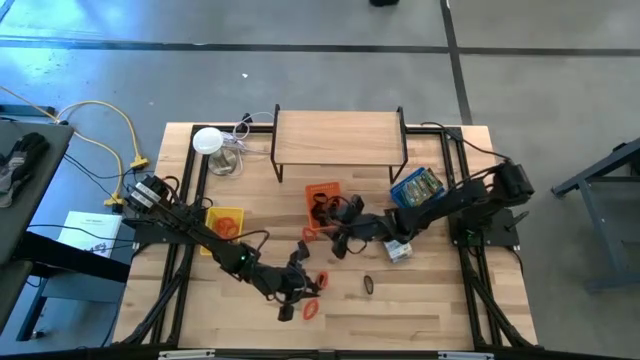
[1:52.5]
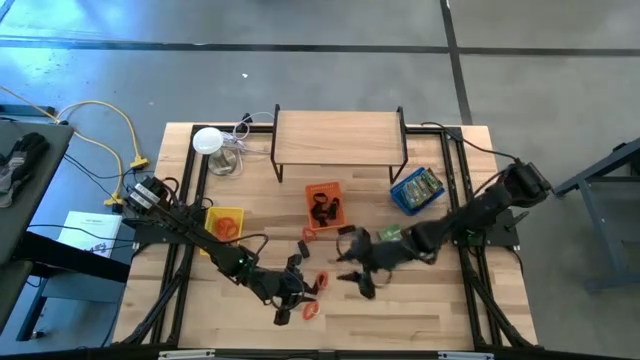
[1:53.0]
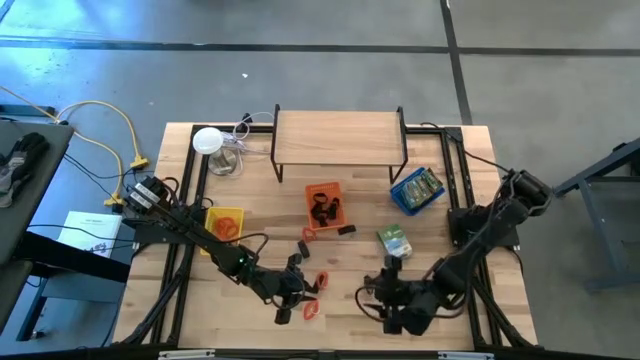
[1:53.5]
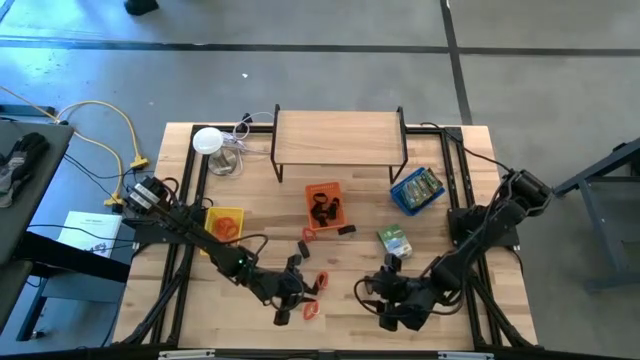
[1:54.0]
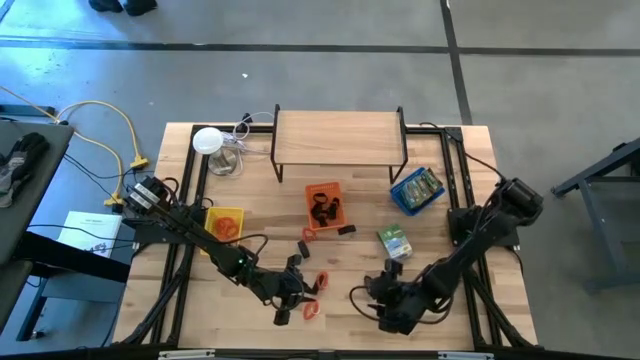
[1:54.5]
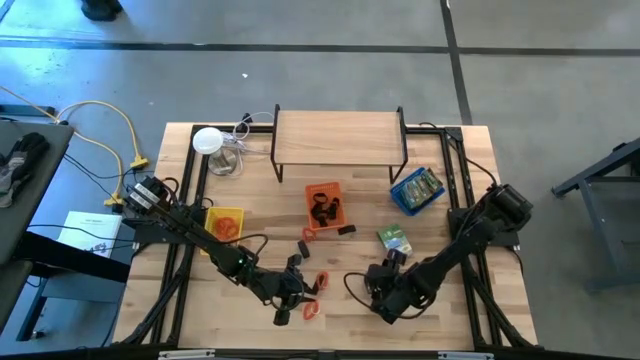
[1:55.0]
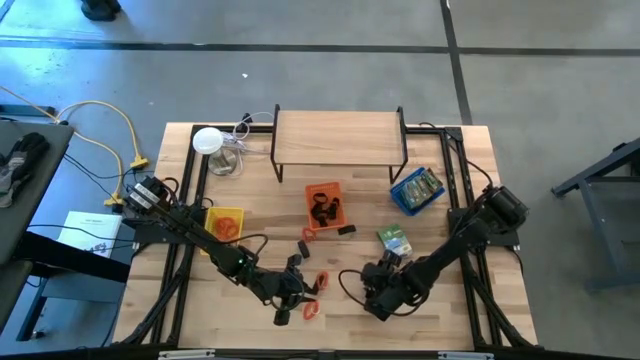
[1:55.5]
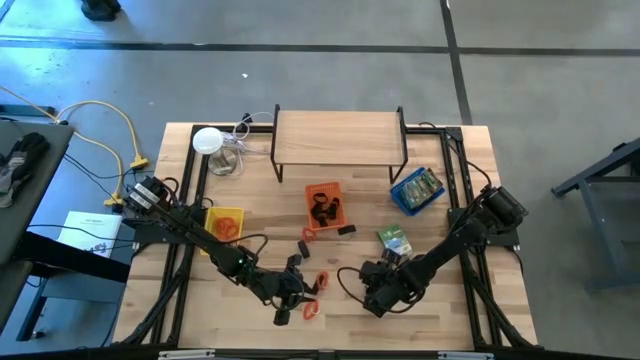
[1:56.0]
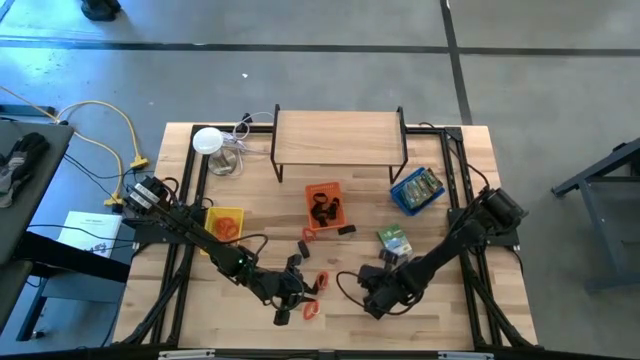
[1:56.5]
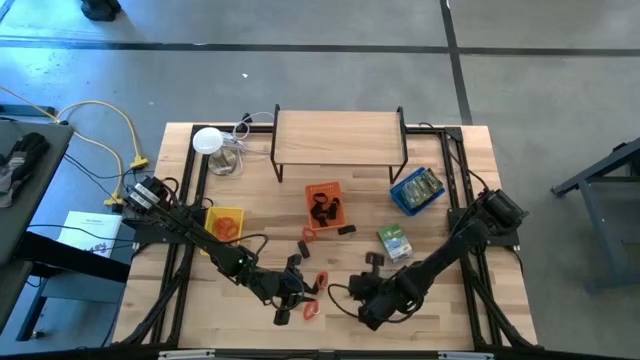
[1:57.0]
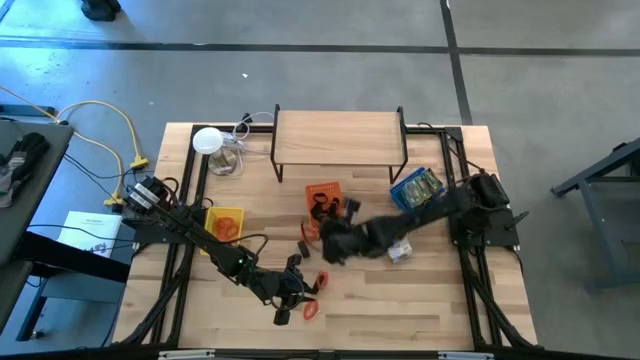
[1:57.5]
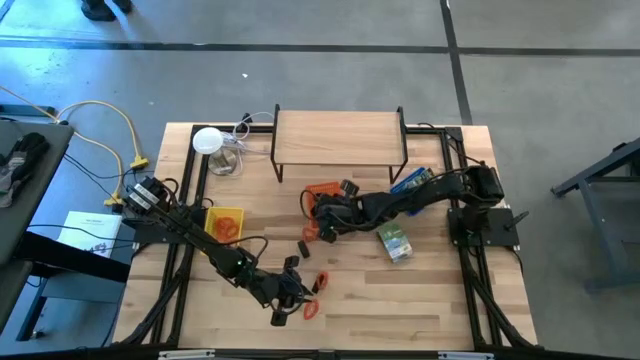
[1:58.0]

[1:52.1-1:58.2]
Task: Pick & Place Office Desk Supplies
Put the black rubber band into the orange bin

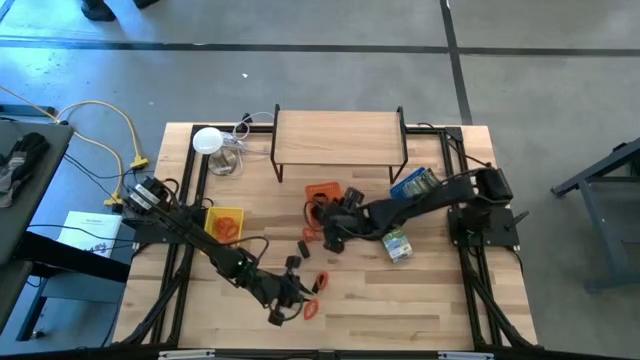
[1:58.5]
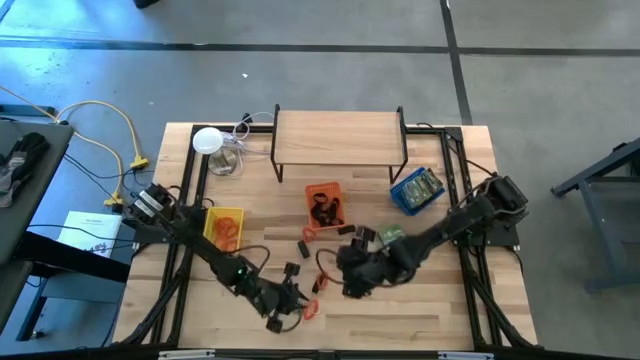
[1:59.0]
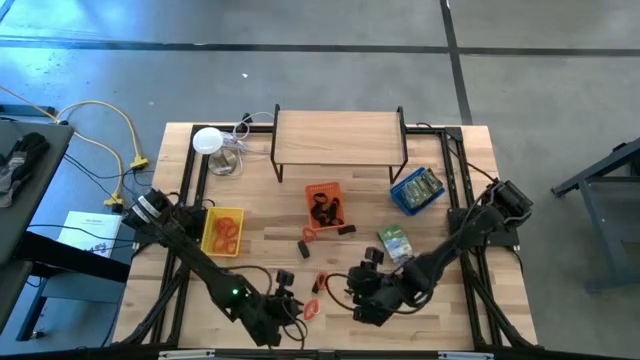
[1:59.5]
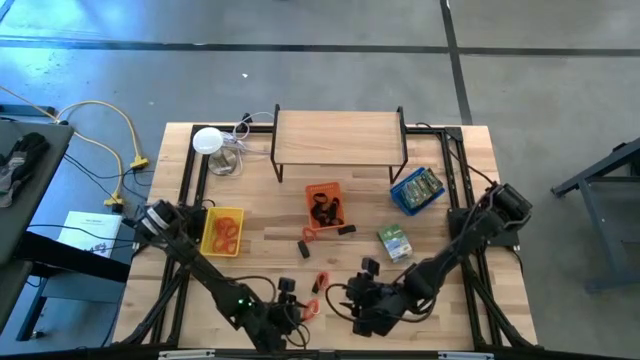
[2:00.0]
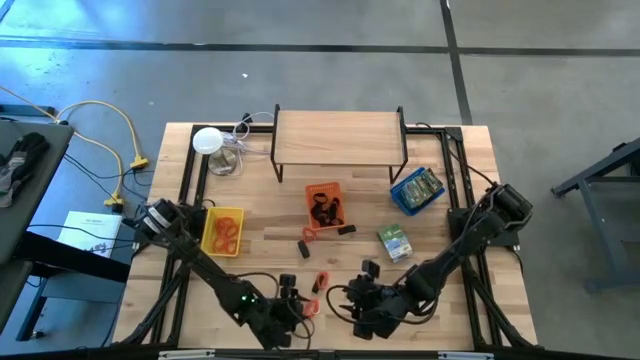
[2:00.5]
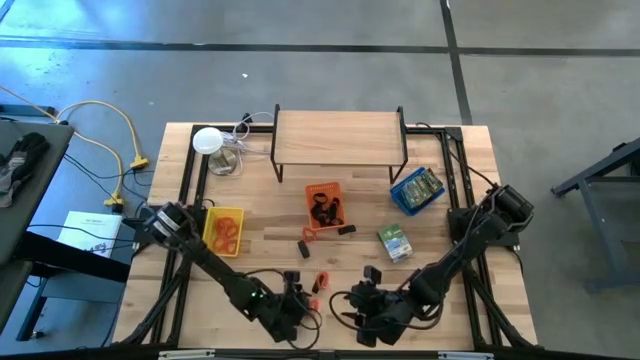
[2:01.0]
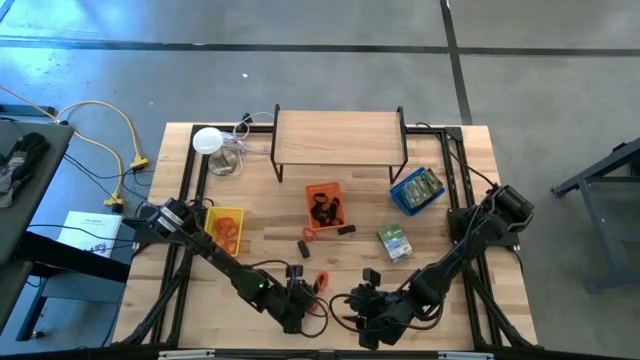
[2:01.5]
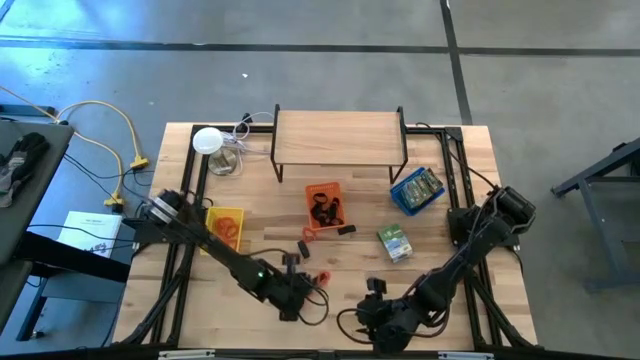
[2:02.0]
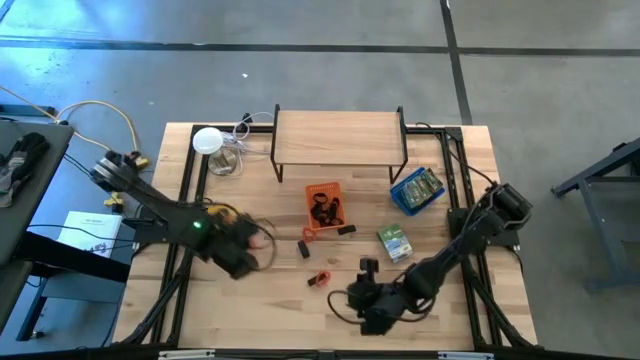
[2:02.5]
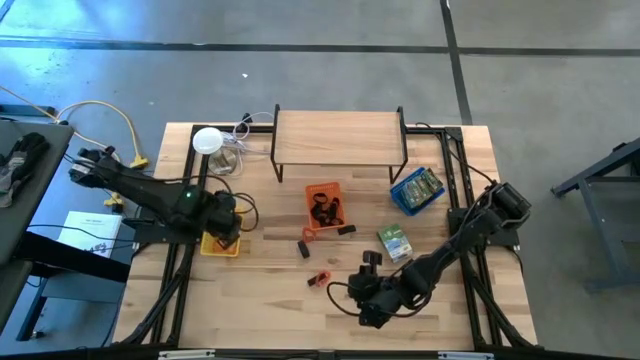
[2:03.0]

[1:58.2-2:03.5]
Put the orange spring key chain into the yellow bin

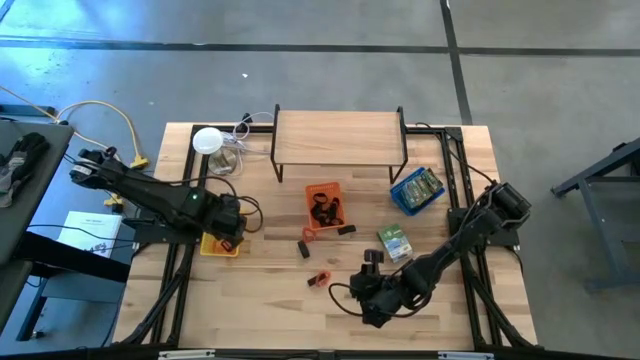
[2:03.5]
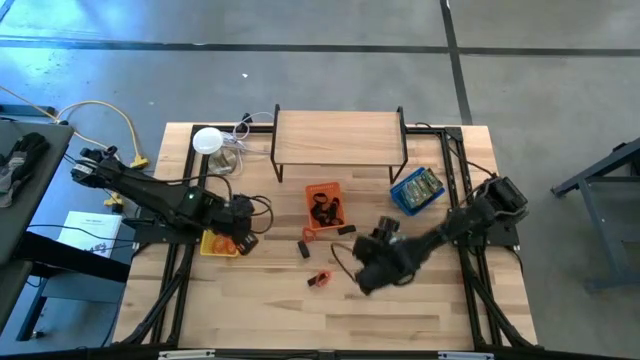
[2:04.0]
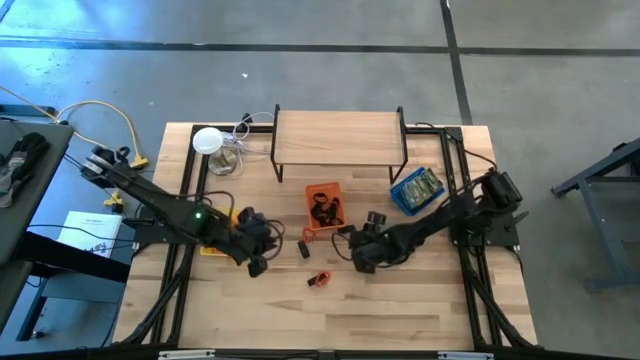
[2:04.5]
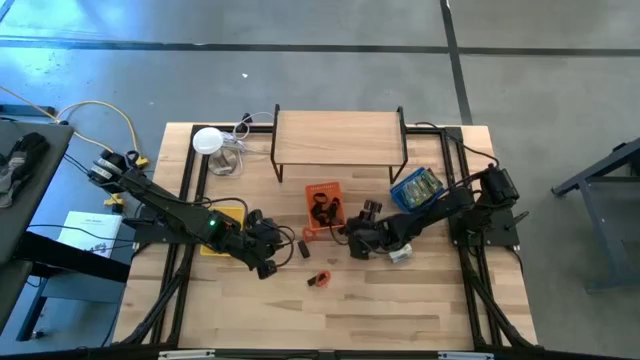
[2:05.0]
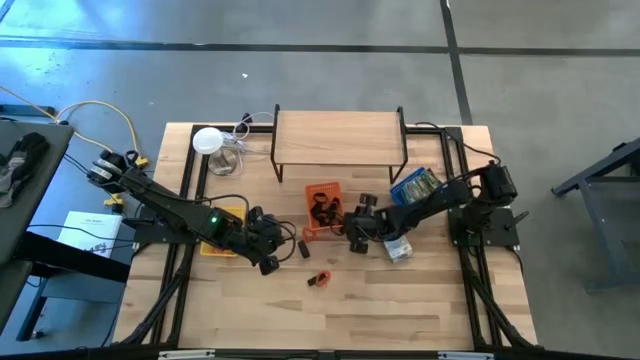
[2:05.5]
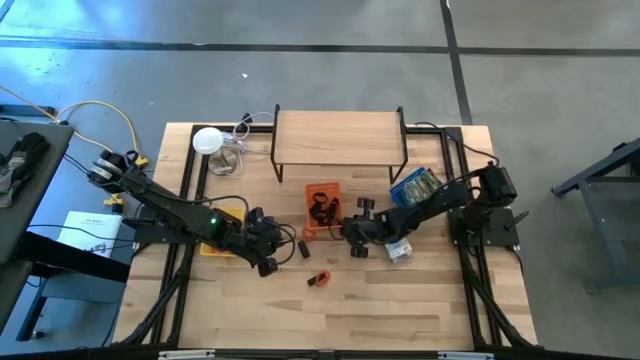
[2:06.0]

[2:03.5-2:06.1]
Put the black rubber band into the orange bin

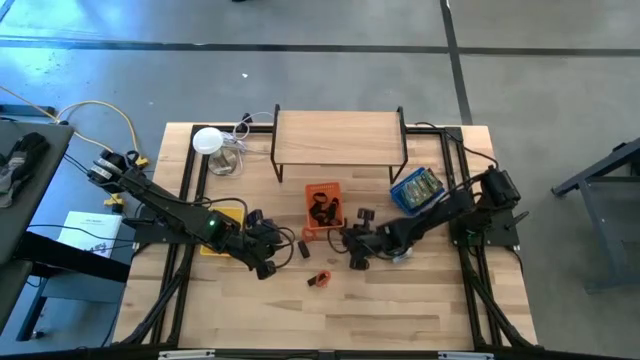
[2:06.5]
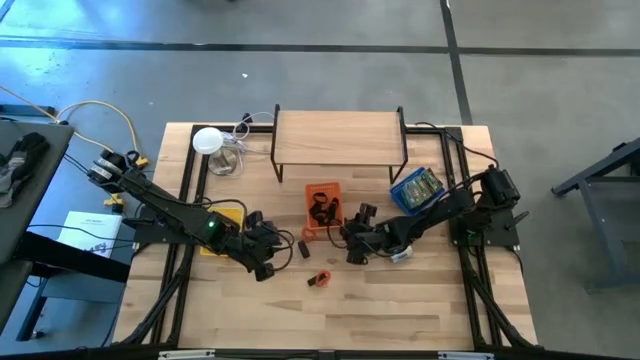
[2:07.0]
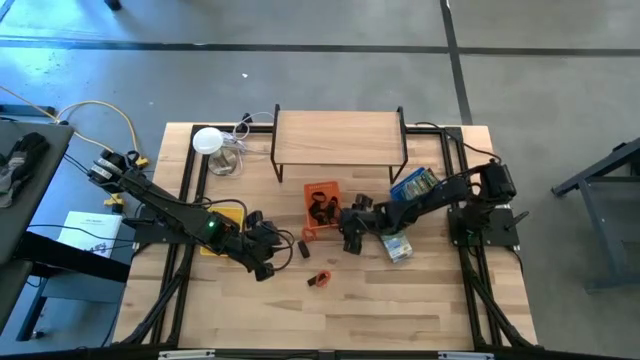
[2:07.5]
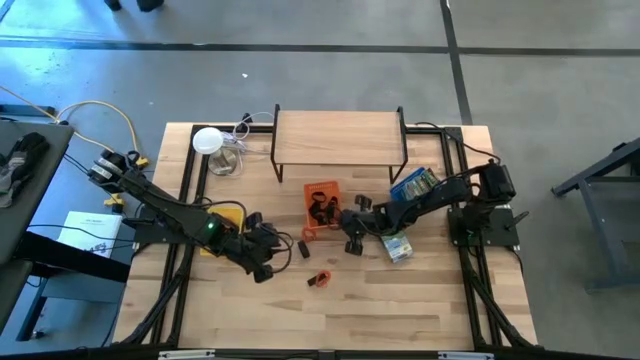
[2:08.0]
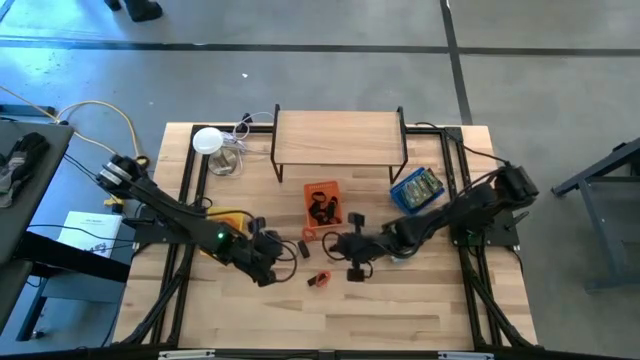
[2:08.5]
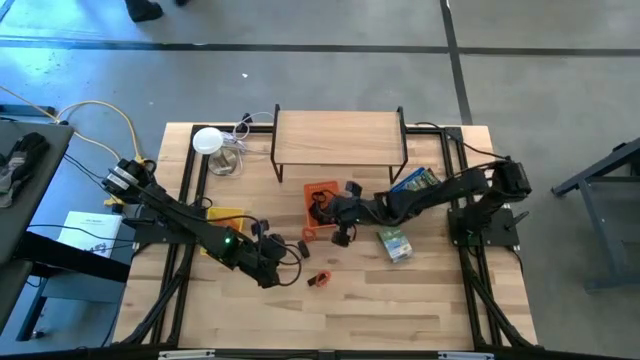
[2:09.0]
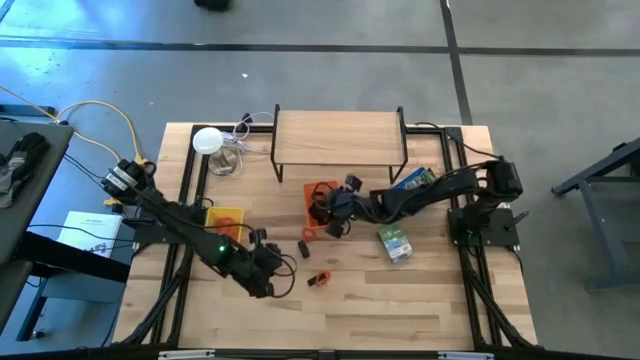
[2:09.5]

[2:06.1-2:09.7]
Put the black rubber band into the orange bin

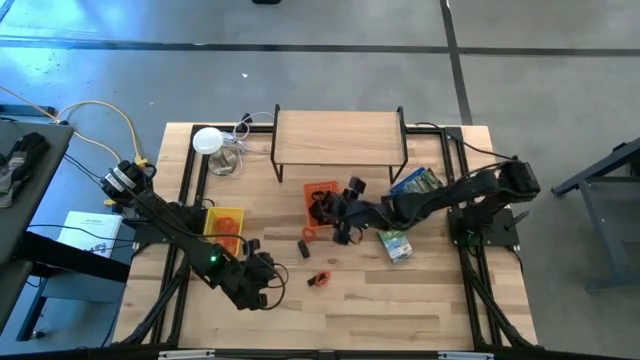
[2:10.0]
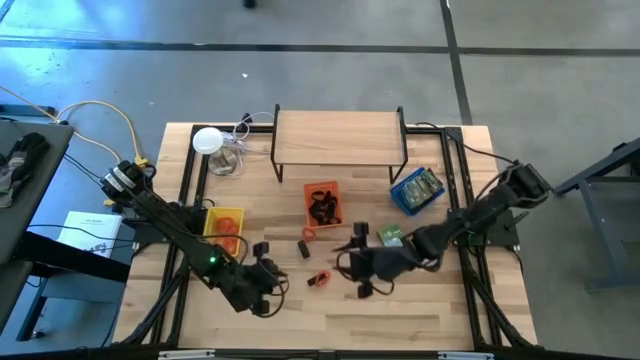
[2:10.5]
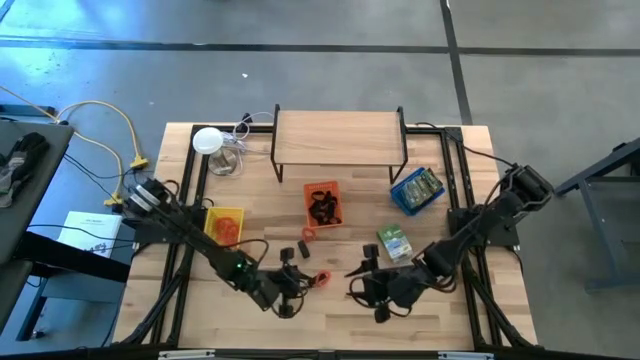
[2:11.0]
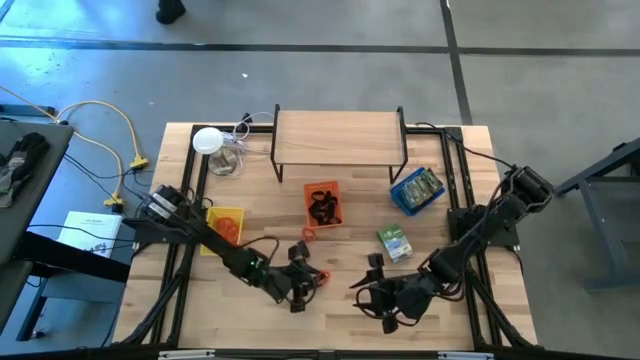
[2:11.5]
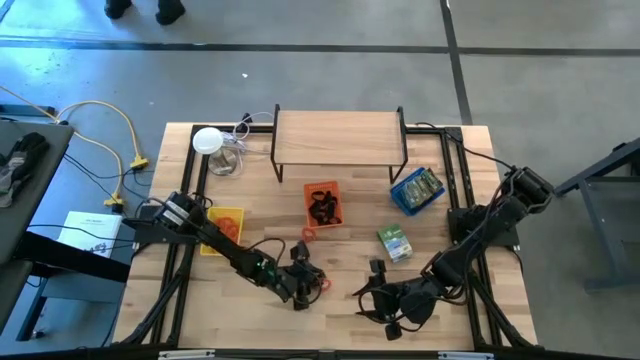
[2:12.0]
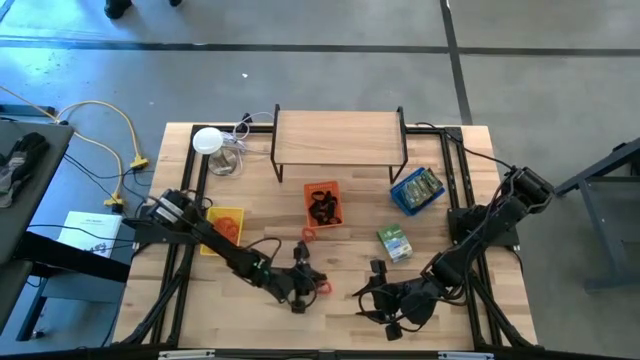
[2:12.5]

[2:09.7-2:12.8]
Put the orange spring key chain into the yellow bin

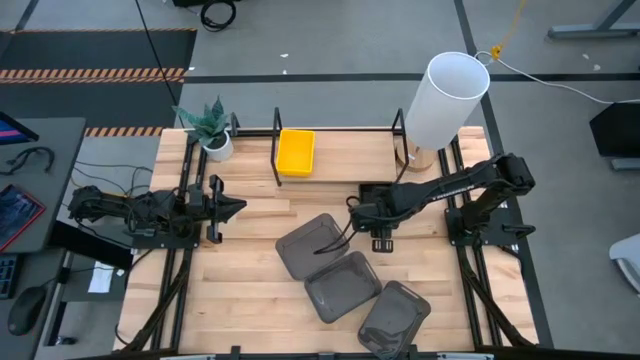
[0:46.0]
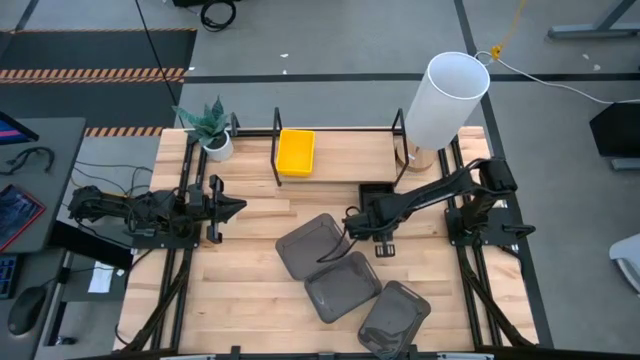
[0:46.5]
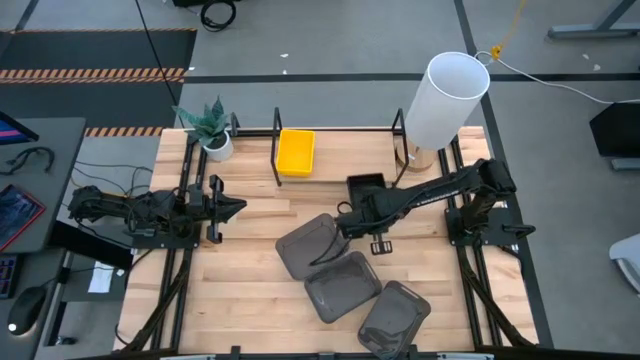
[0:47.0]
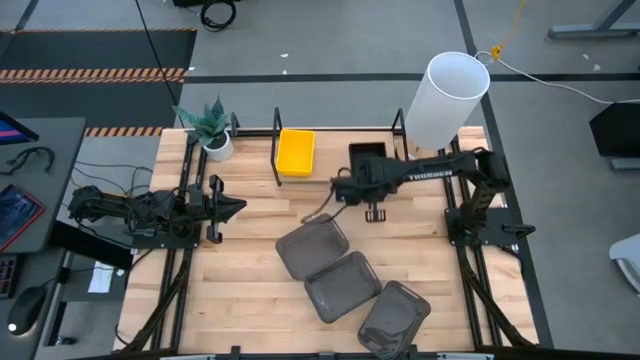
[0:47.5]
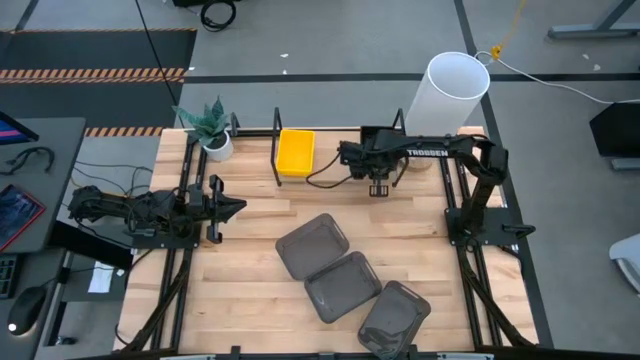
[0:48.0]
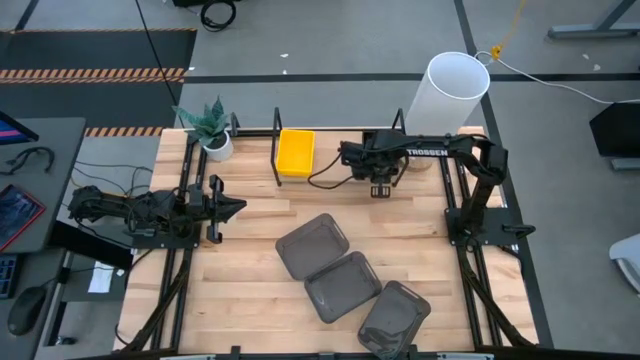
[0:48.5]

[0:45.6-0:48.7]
Task: Stack baskets on shelf by color
Put the stacked black bins on the shelf
